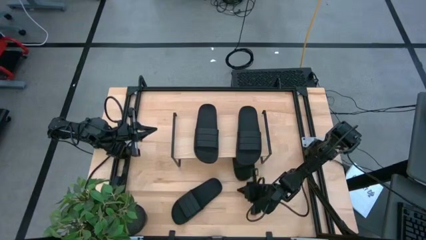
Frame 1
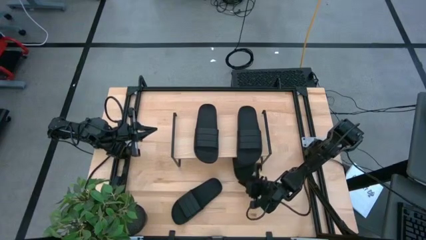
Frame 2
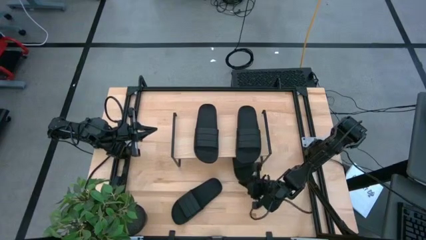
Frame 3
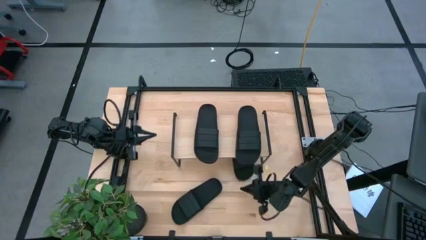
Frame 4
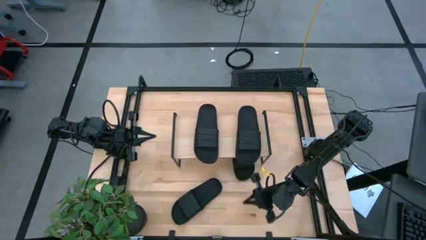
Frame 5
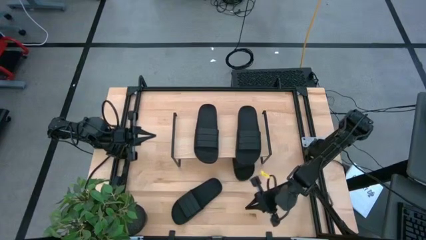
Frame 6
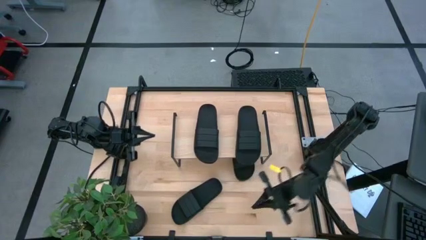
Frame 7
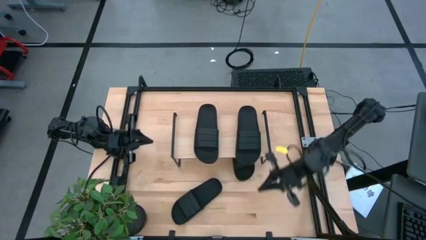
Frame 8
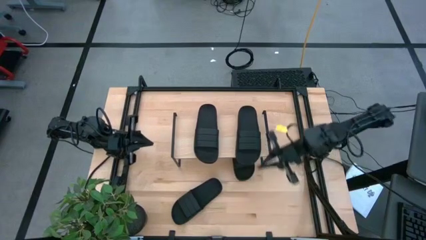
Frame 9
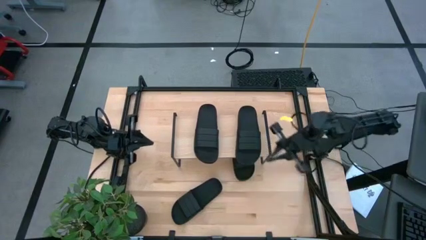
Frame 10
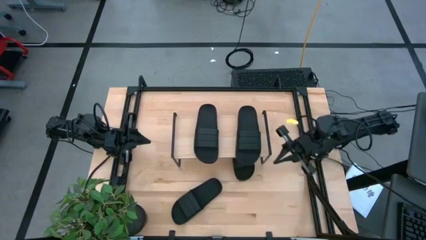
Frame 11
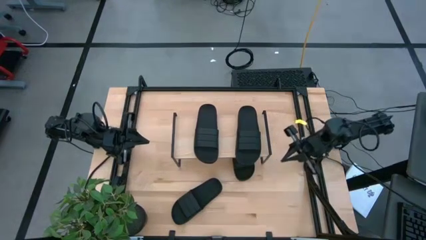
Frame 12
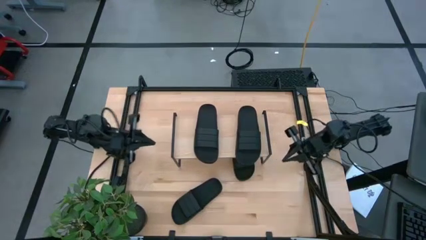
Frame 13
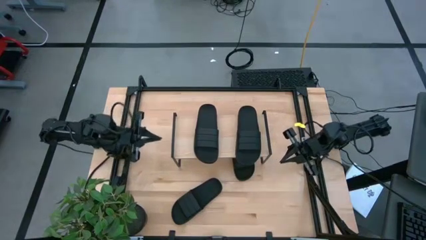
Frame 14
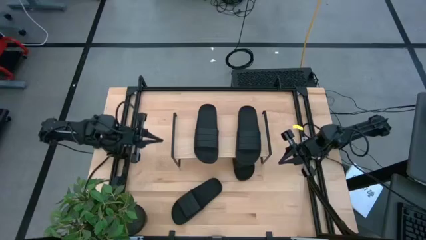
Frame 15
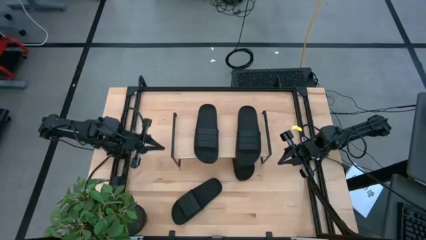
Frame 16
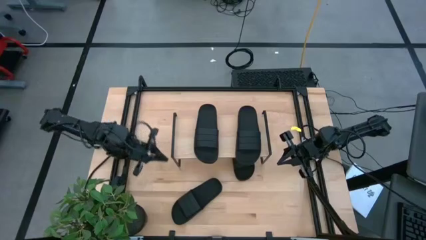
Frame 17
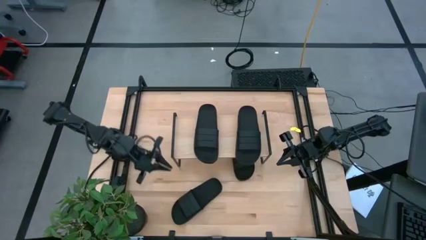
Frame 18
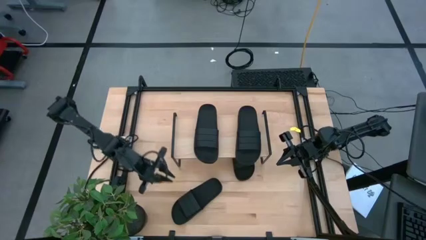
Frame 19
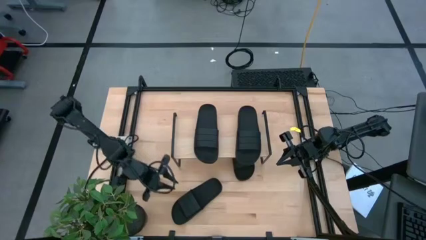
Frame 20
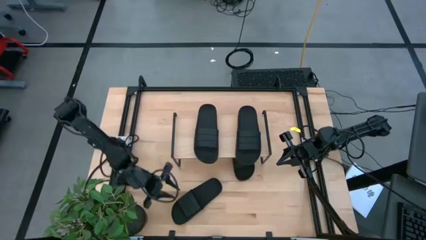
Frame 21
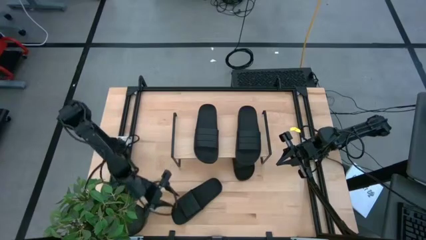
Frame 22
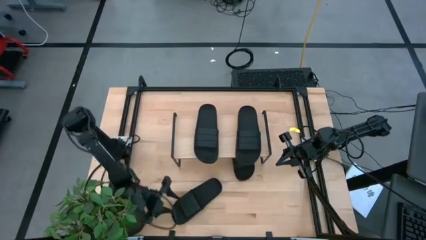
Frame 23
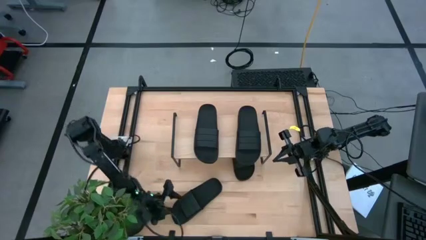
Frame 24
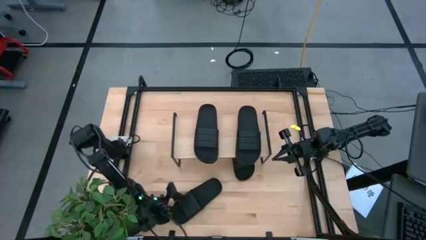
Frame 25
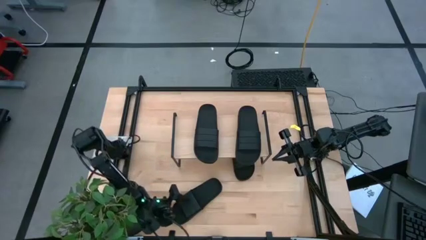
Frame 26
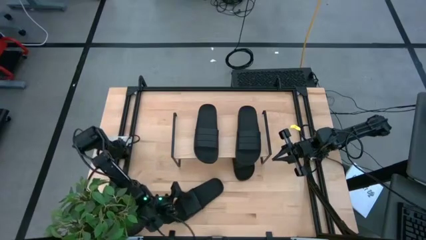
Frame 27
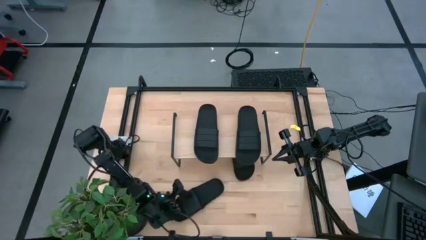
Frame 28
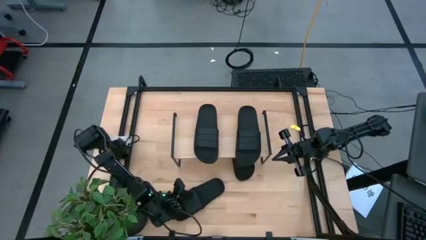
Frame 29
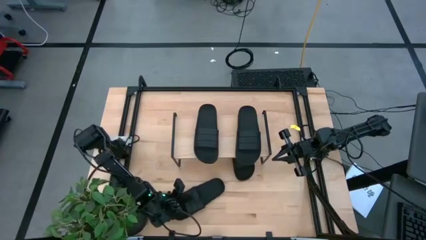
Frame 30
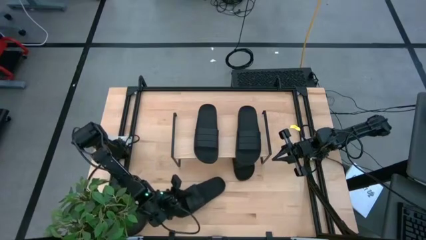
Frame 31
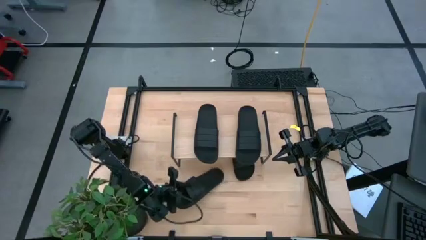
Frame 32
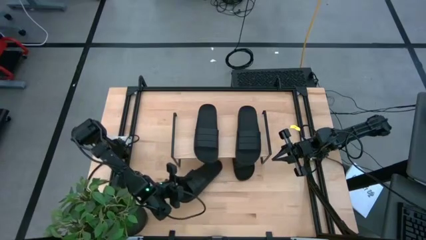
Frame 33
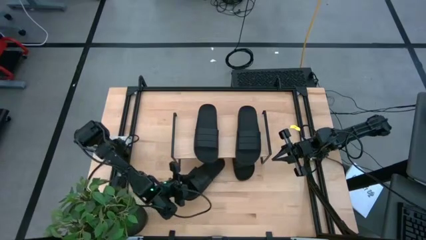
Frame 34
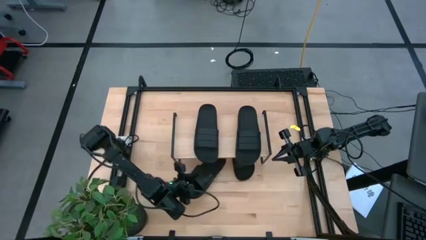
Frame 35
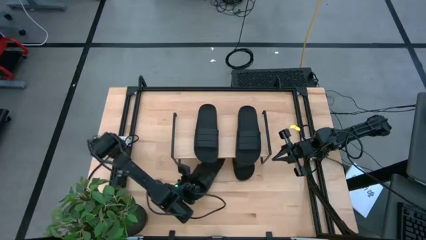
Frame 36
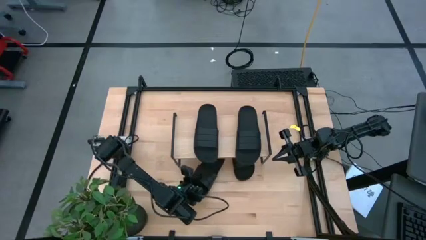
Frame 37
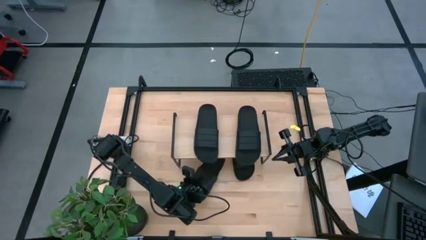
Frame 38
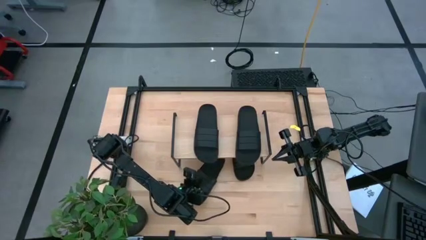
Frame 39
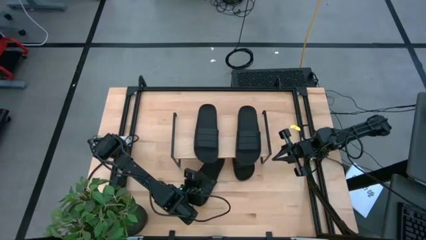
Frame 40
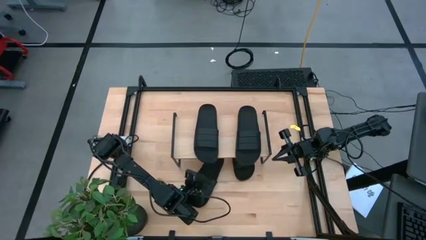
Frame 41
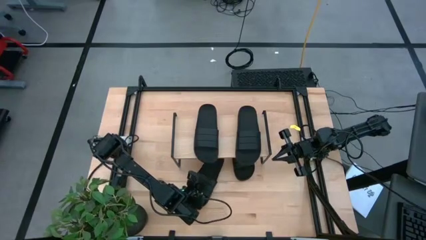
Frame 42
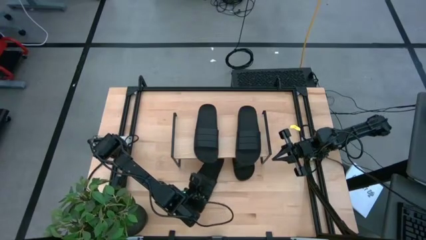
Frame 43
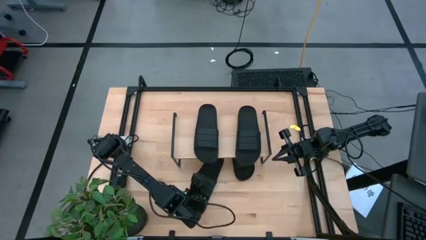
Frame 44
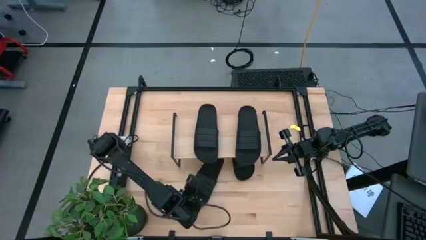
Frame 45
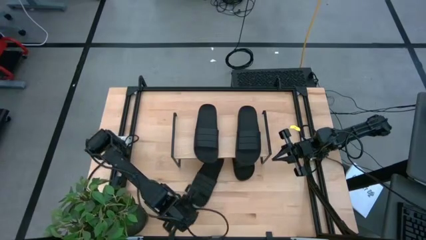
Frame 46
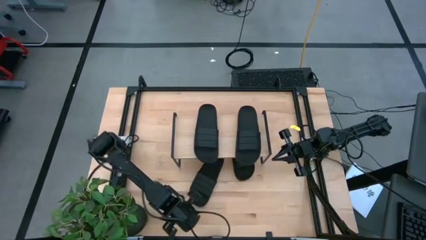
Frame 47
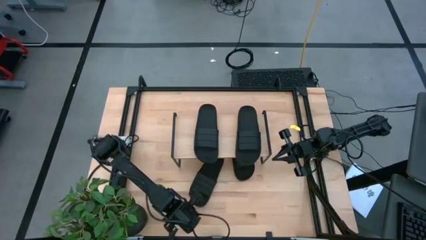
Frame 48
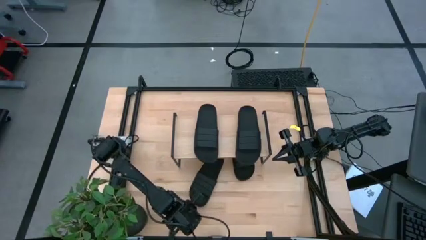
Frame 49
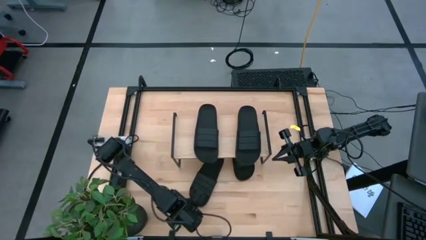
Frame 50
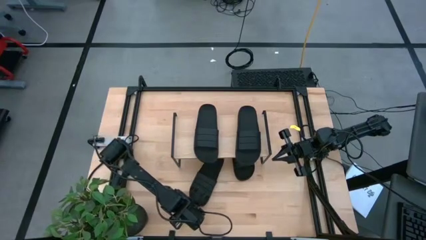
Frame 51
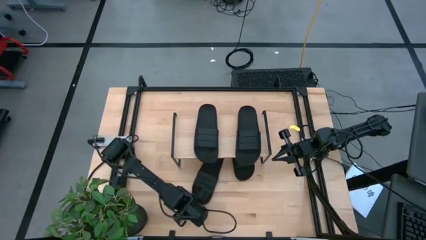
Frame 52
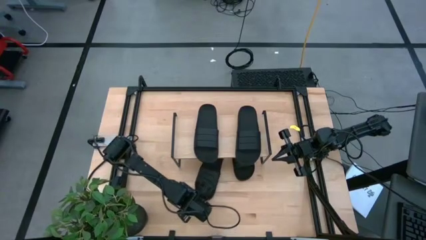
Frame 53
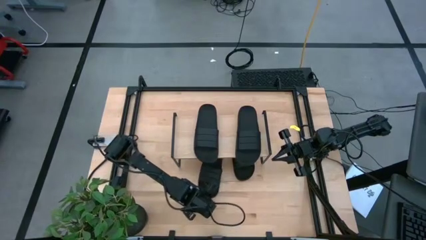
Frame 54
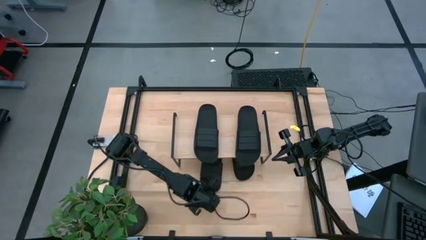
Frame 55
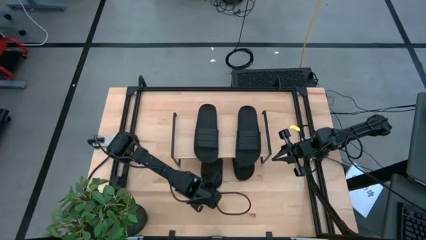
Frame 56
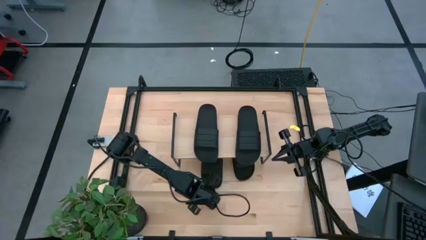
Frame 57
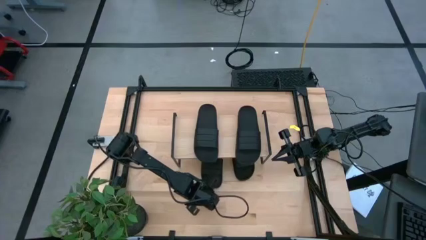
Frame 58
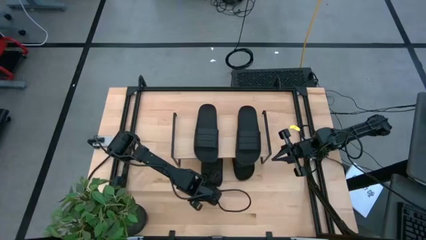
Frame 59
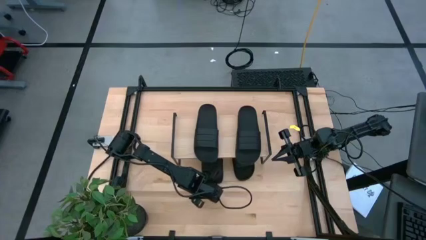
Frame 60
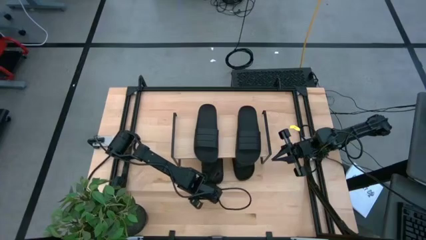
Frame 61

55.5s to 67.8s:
Task: Pick and place slides into the shelf
Put the black slide under the shelf

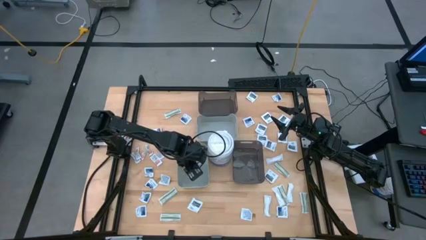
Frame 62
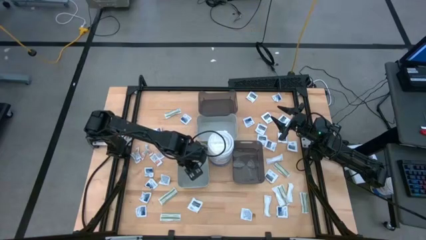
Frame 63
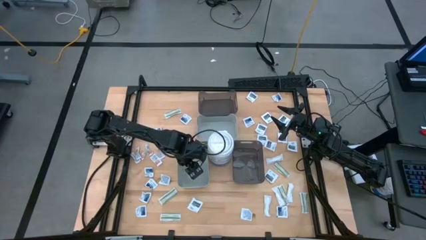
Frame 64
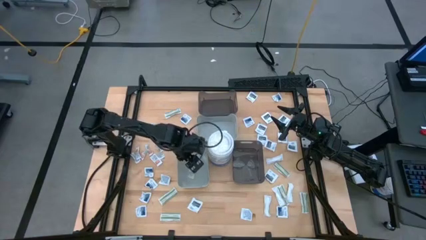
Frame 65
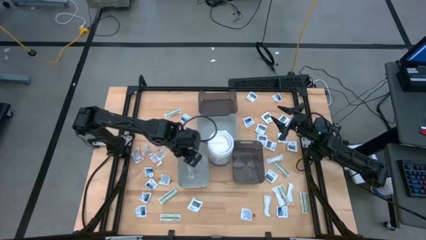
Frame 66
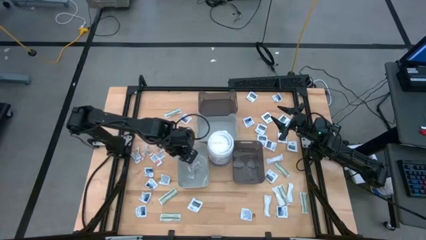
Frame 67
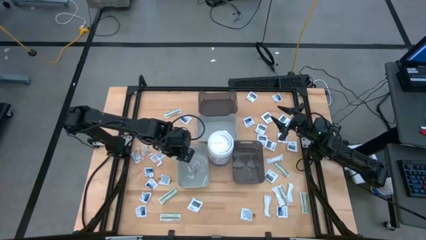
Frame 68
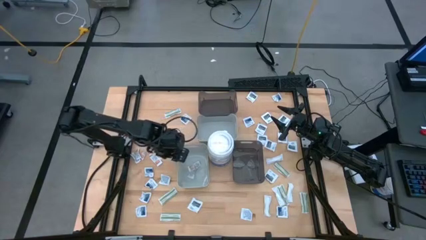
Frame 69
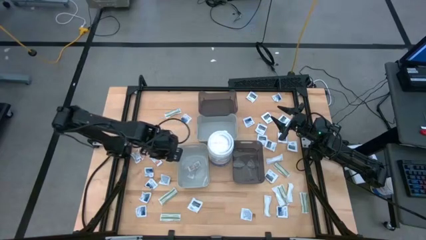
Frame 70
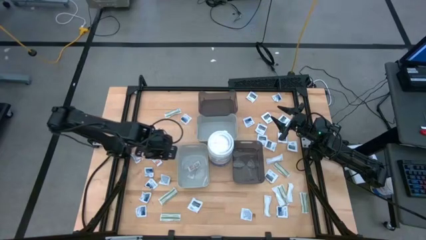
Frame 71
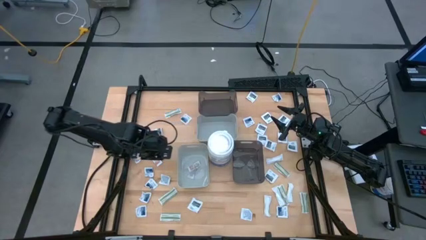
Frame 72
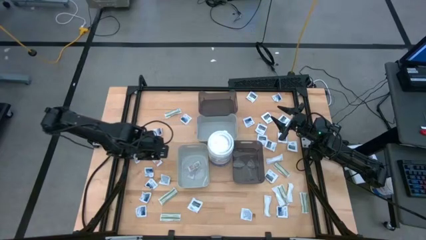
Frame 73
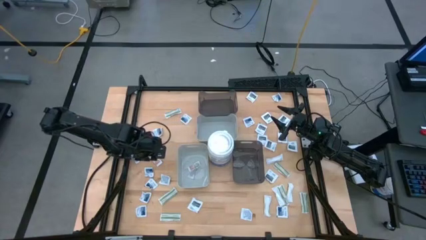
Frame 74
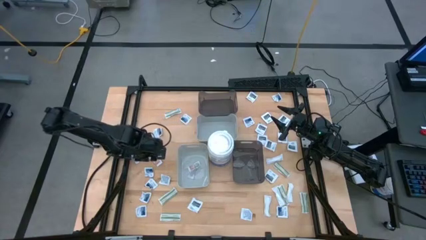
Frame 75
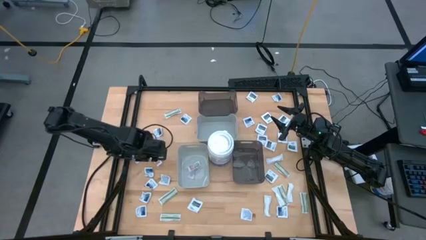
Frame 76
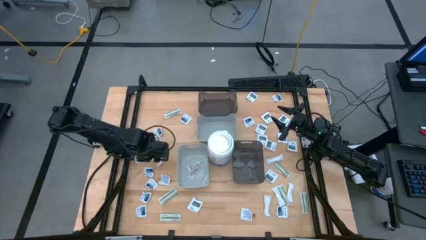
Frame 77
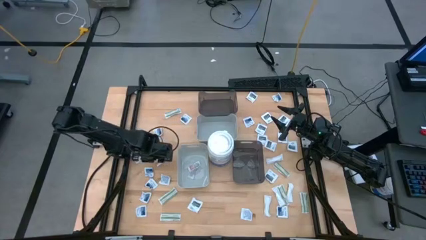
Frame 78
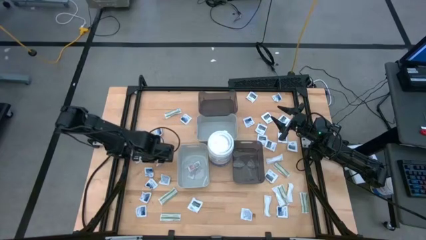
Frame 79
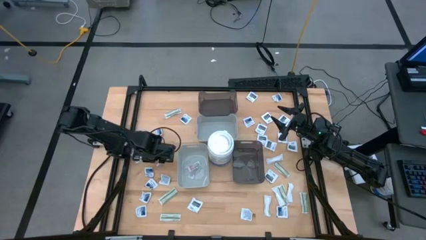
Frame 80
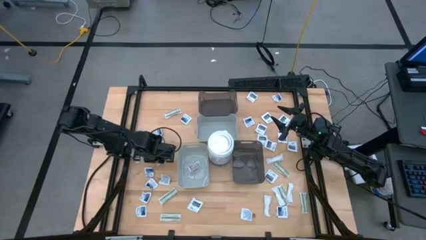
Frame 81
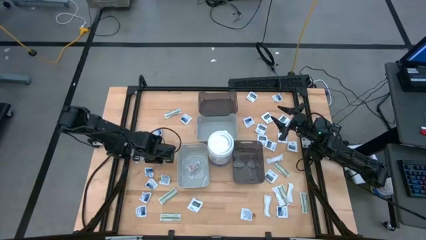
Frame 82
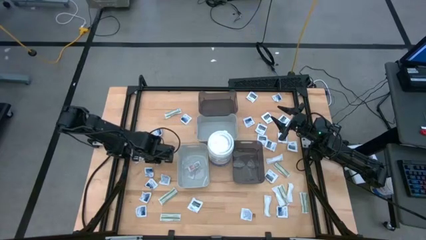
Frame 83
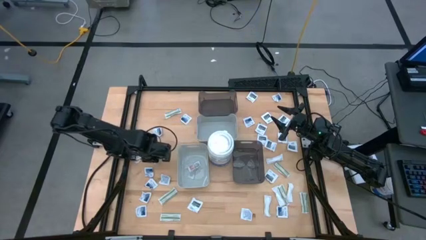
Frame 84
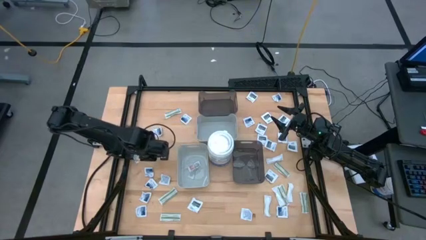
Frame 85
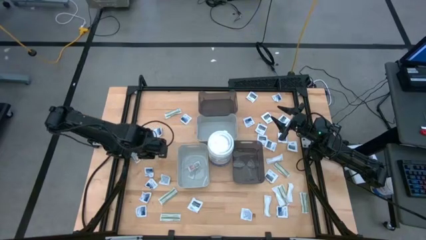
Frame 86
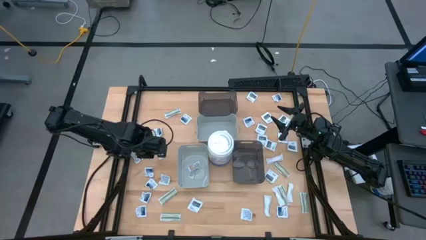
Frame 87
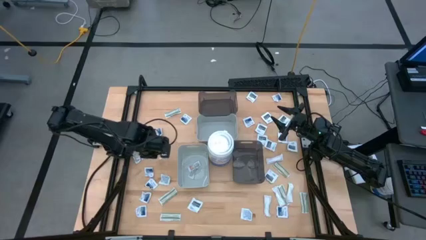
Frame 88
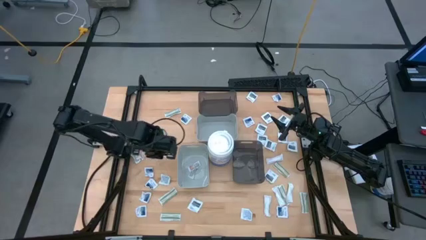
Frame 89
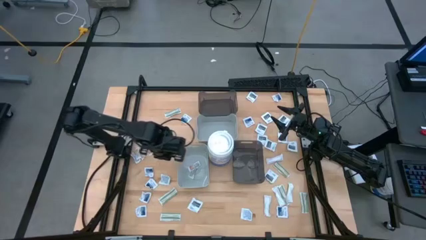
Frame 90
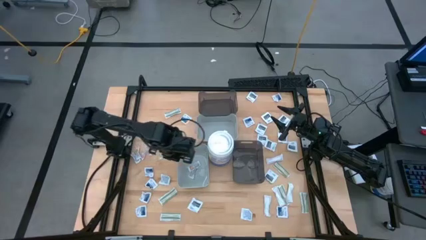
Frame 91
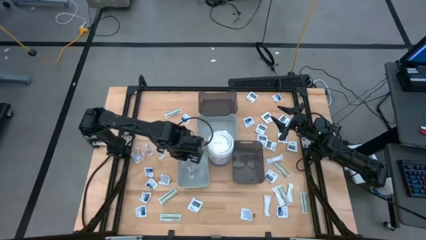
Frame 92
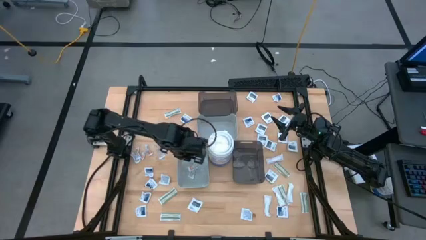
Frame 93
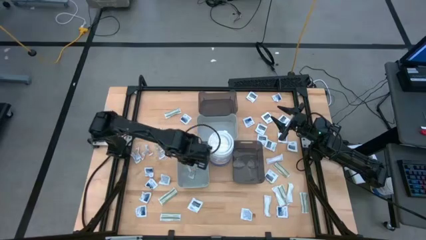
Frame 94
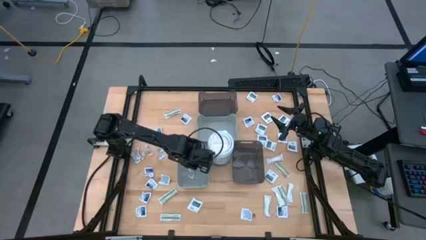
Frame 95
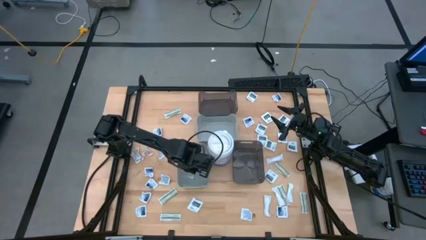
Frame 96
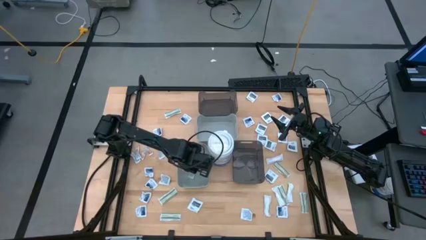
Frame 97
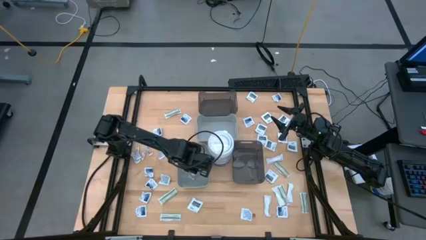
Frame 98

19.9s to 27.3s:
Task: Pick & Place First Aid Supplies
Put the ointment pack into the bottom gray bin
